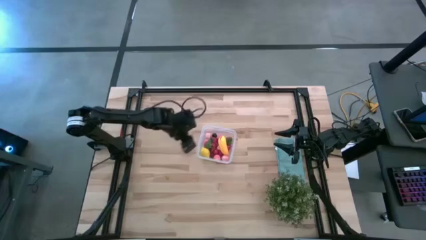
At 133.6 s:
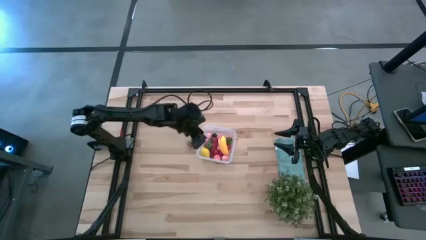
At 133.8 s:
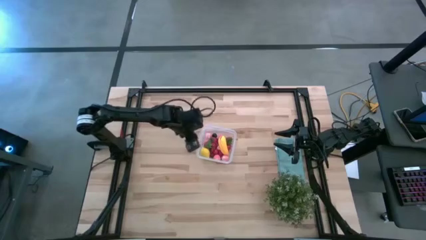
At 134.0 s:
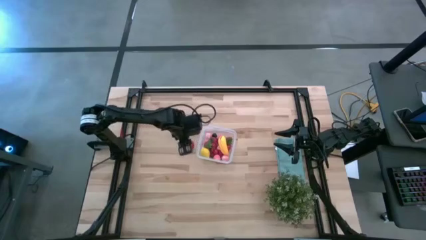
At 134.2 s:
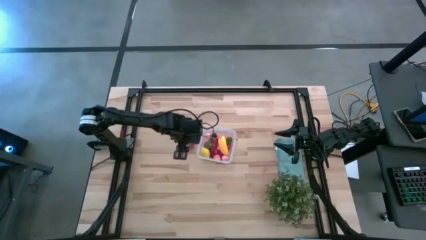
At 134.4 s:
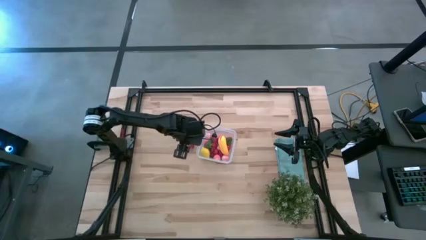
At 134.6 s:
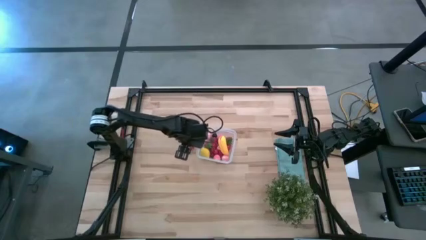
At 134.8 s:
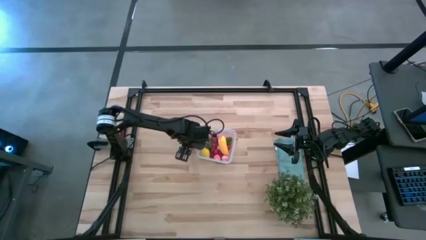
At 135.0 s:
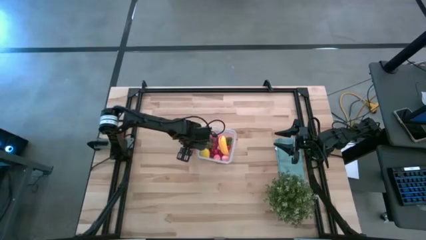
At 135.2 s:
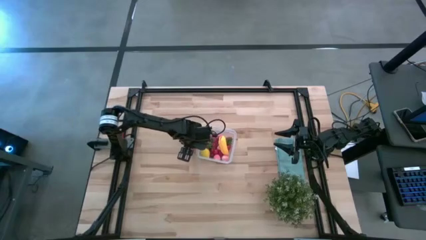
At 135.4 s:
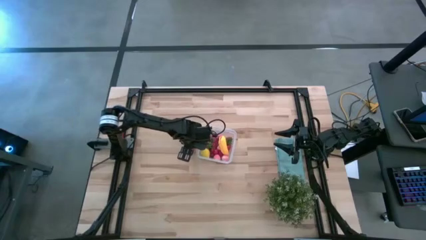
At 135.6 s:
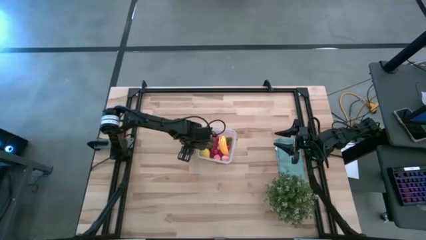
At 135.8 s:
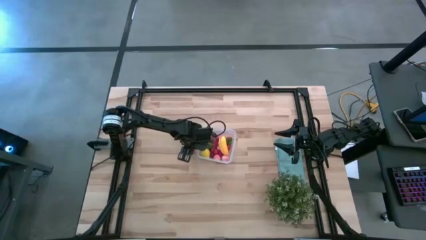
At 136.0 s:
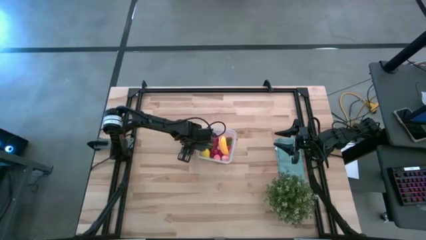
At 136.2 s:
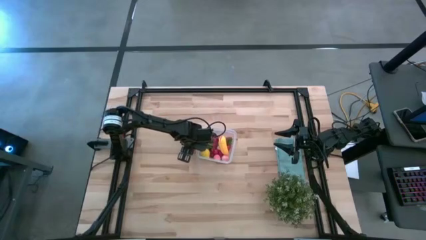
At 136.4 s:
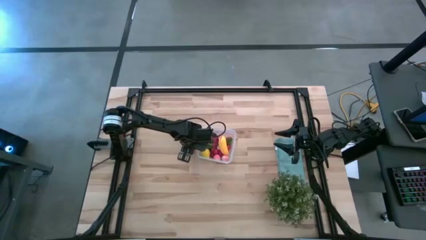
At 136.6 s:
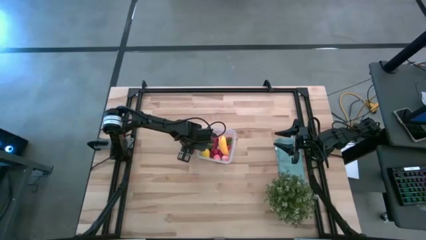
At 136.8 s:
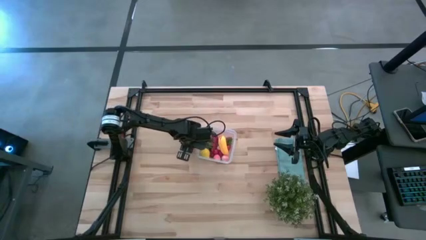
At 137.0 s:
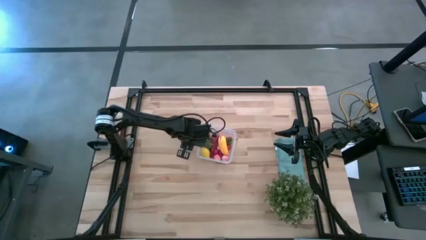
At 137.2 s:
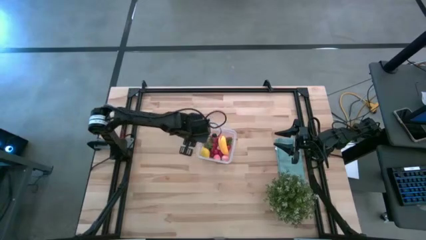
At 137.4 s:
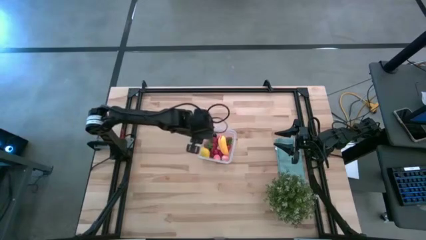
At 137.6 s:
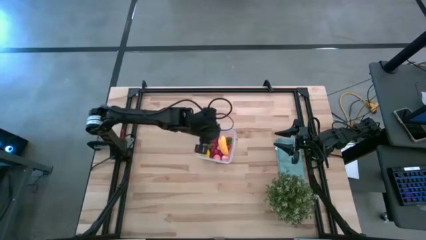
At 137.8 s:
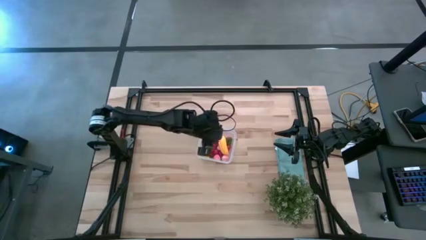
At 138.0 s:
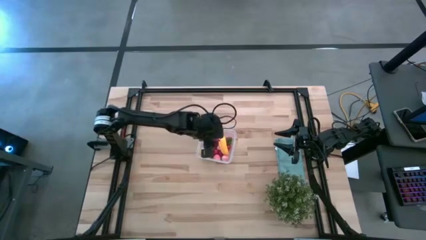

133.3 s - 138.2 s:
Task: Pick and placing Produce into tupperware
Put the strawberry into the transparent bin

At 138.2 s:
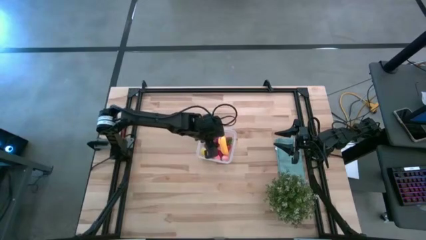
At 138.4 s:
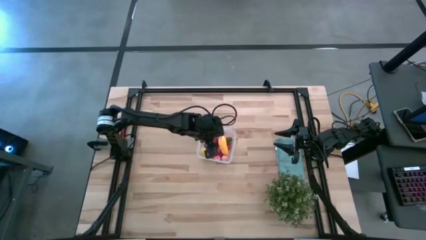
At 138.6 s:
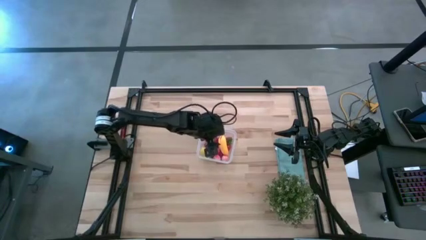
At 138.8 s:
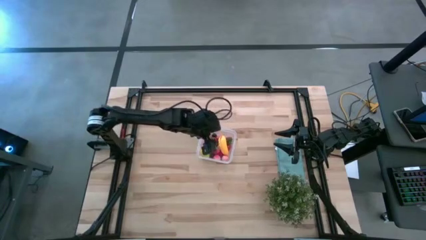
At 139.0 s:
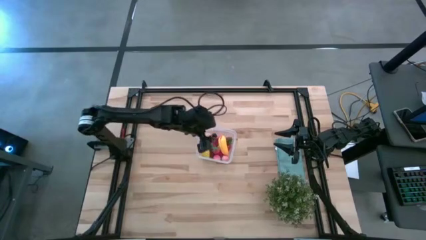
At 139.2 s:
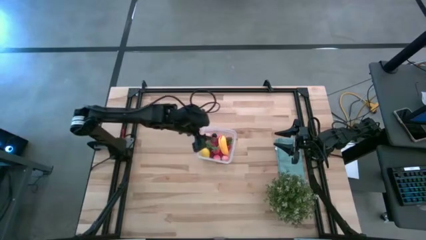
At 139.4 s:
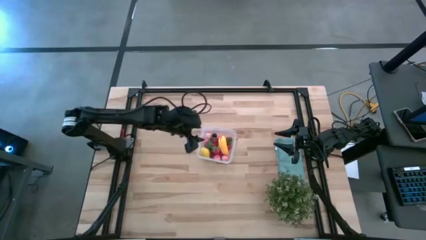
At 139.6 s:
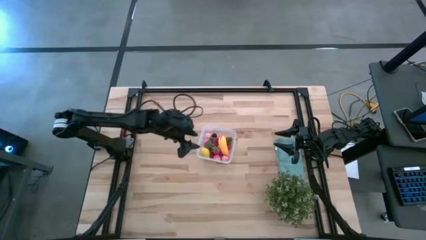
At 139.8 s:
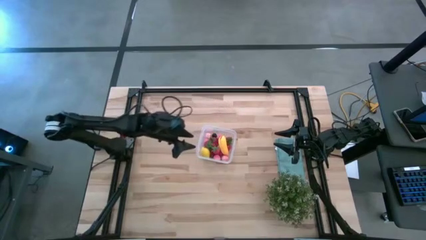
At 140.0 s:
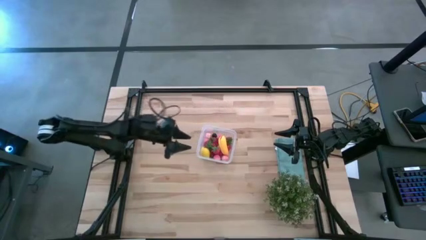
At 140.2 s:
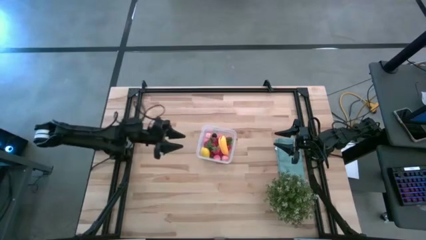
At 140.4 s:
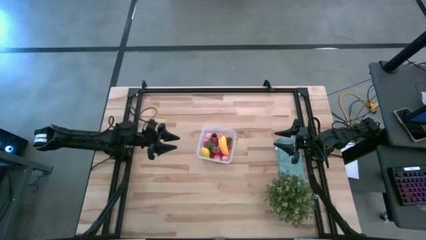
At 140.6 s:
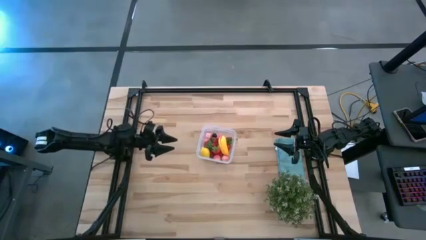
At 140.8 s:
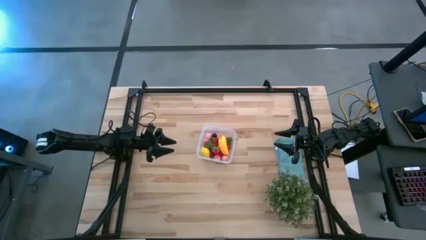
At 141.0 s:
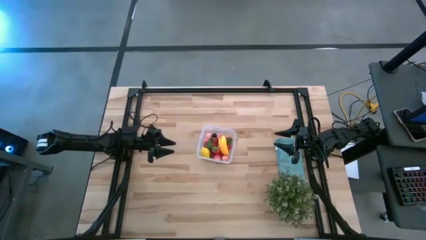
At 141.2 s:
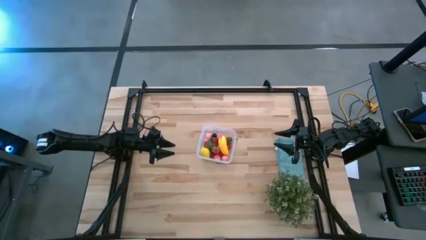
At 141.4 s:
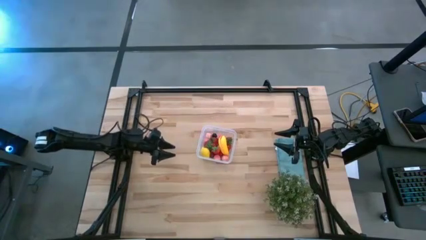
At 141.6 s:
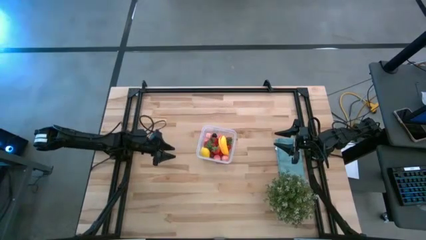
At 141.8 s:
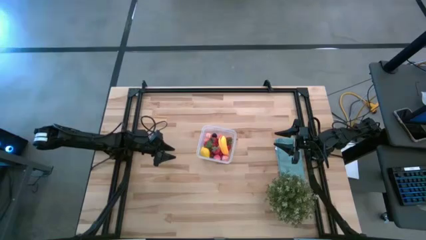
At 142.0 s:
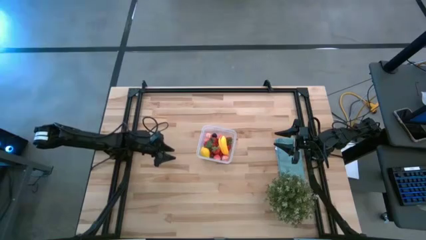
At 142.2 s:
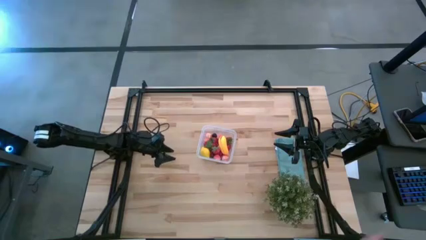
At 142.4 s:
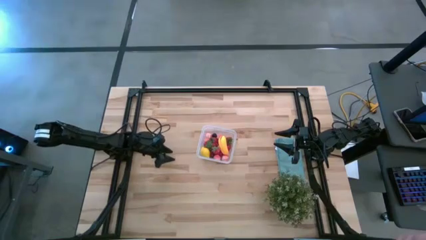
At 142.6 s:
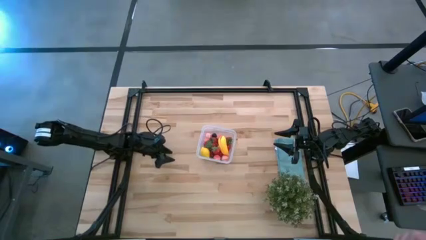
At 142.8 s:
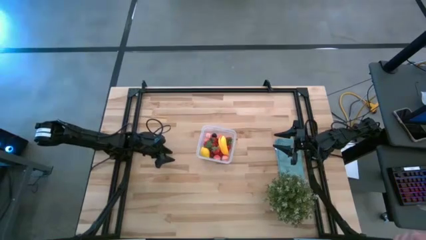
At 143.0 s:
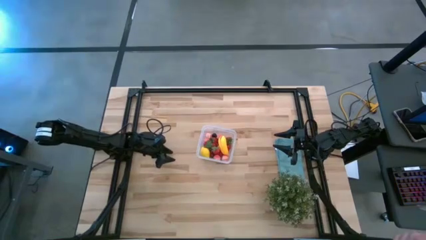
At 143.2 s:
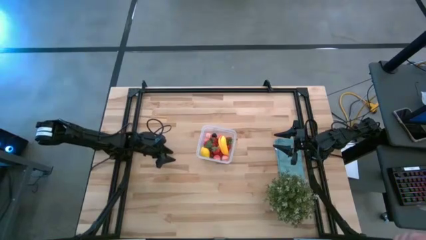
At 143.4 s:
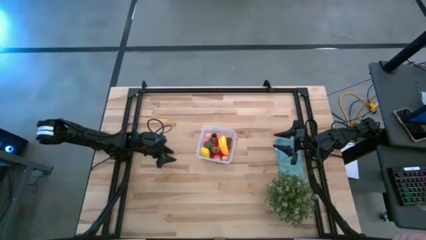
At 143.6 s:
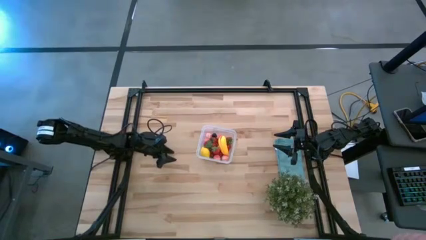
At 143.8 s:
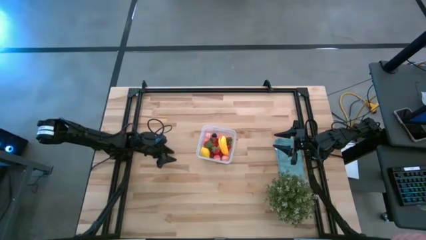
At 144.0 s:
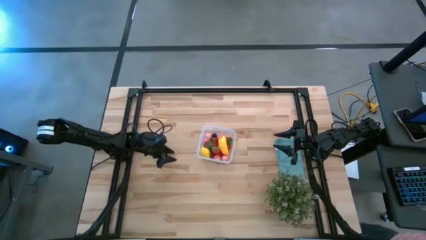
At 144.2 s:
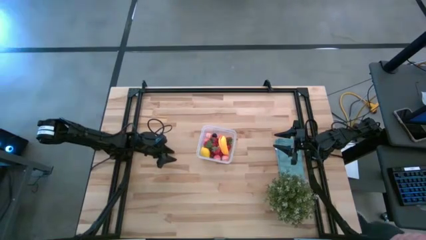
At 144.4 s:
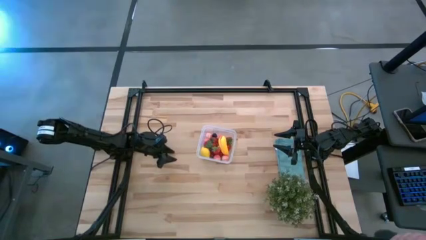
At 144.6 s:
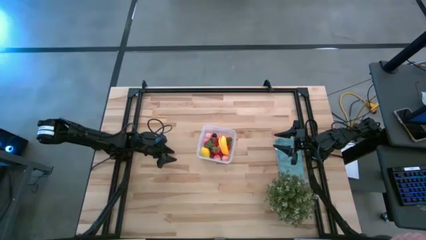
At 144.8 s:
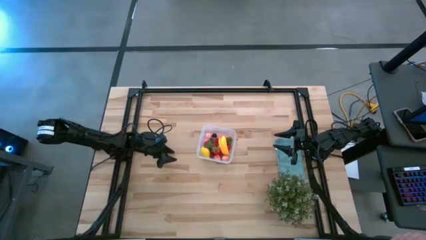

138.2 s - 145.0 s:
Return to Home Position

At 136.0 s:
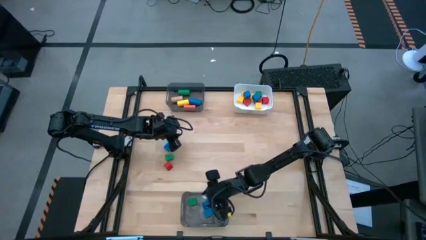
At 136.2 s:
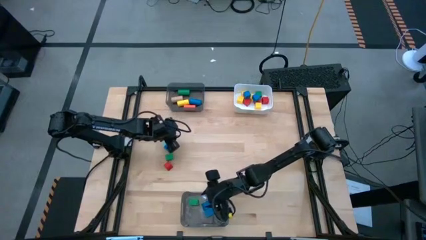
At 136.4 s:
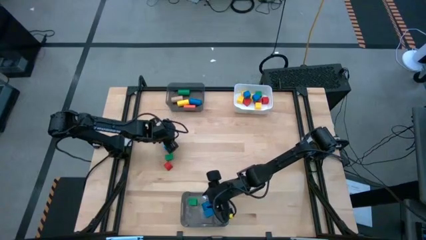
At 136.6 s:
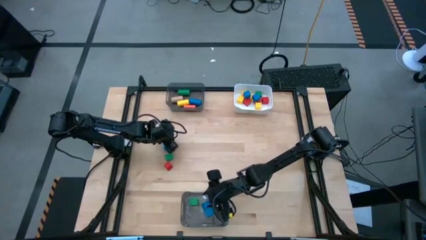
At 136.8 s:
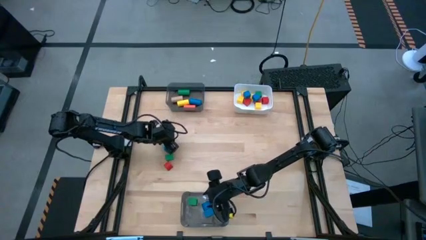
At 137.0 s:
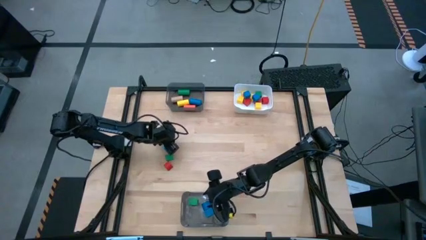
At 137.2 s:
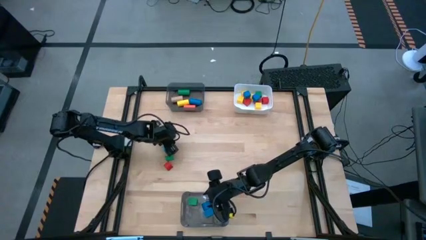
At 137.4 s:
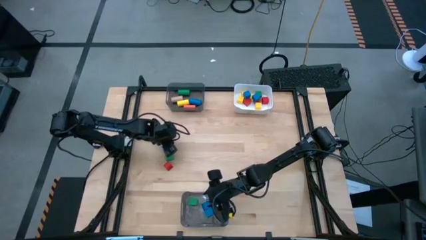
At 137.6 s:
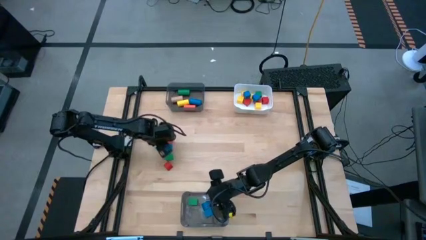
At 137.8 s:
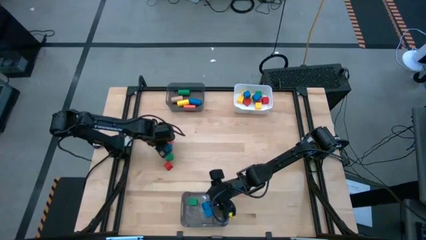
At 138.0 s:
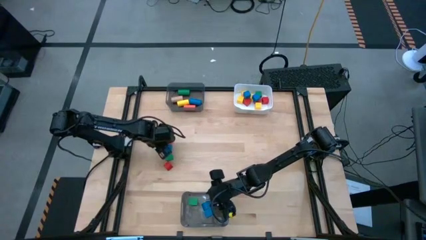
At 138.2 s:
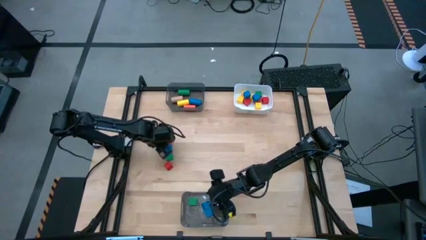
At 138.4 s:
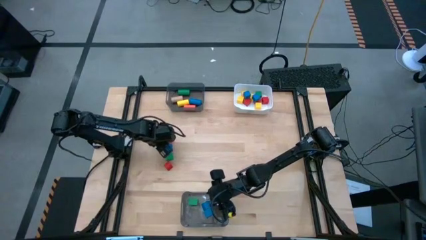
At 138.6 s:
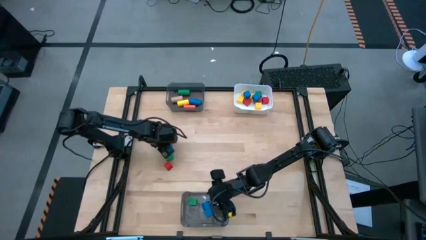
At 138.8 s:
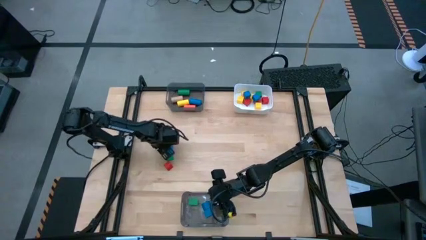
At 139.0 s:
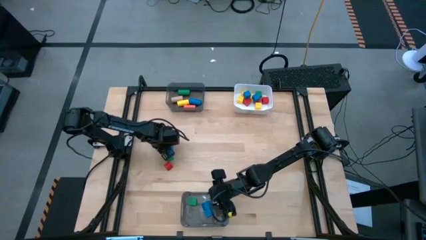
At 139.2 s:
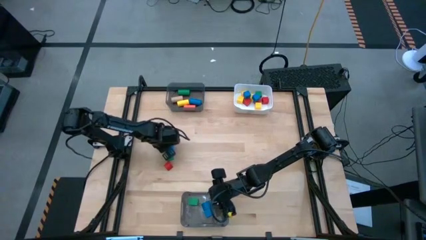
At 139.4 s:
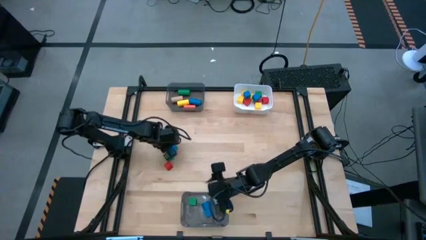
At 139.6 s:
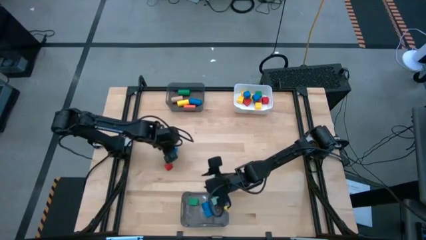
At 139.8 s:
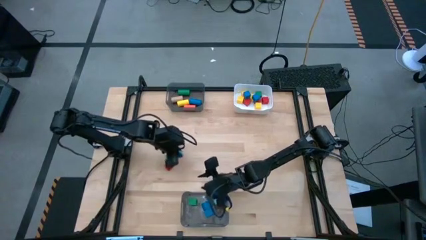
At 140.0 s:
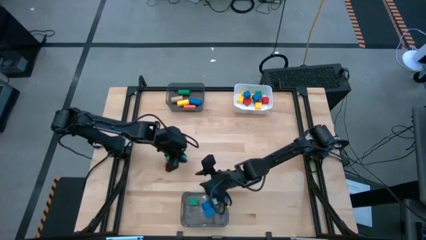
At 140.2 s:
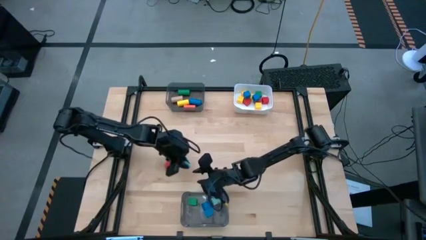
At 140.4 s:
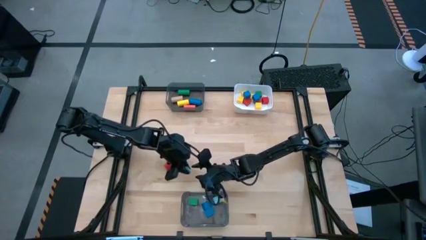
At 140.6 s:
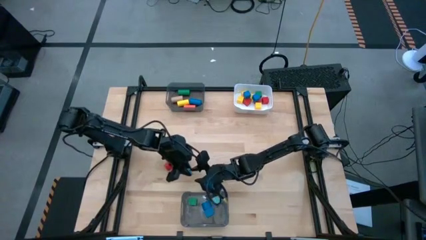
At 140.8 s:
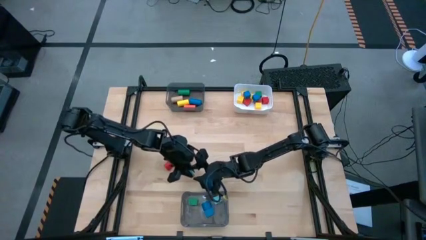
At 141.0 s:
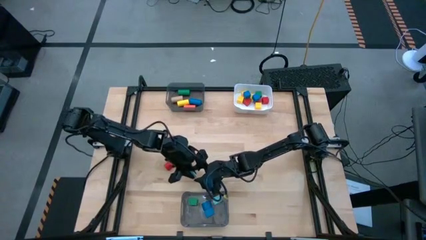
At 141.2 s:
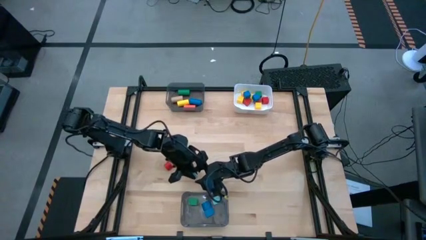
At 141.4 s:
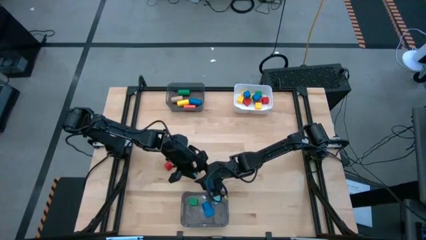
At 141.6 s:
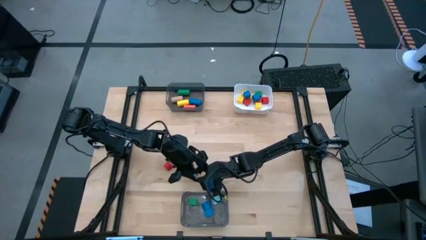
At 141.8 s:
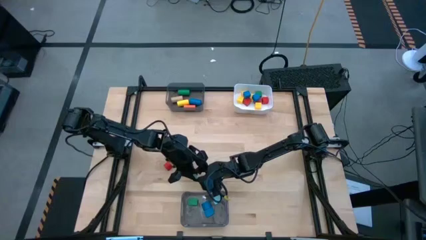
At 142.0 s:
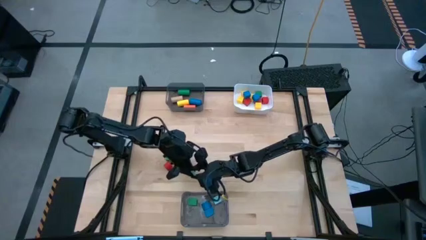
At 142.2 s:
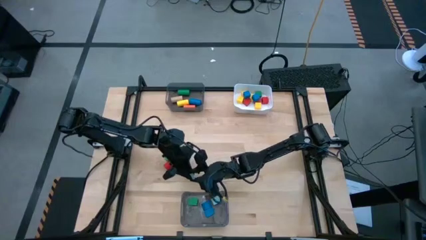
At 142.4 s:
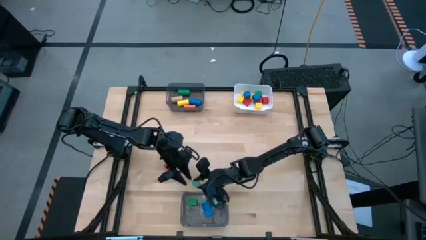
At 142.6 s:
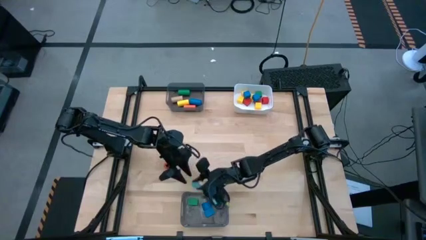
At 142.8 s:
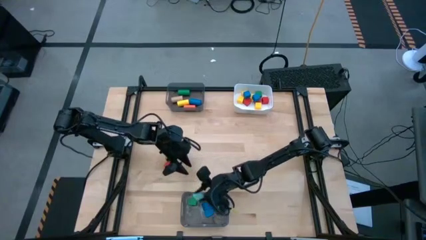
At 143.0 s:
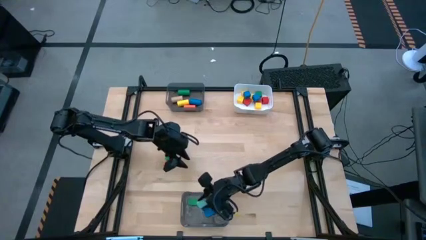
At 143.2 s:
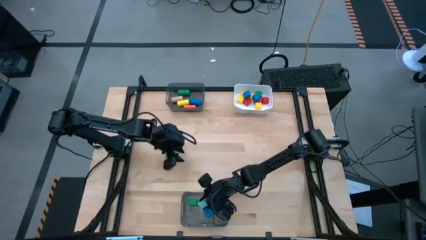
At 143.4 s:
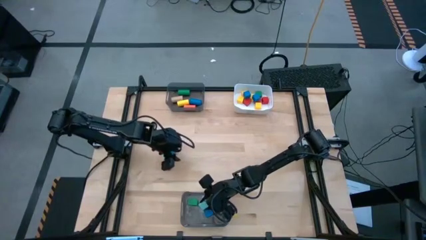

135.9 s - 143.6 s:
Task: Sort blocks by size
Put the light blue half circle block into the bottom black bin
